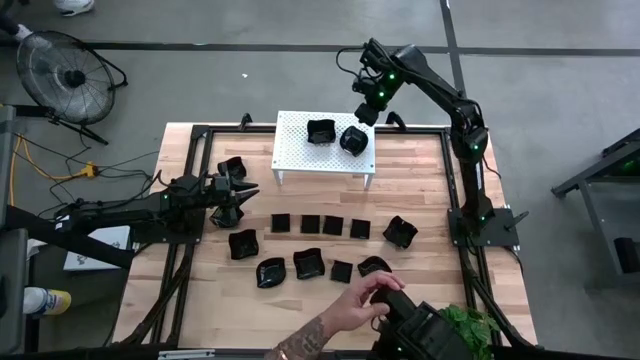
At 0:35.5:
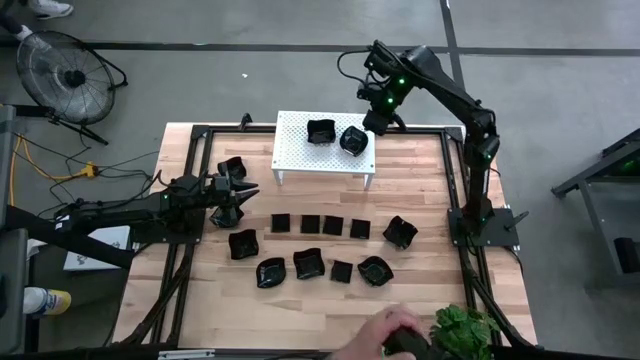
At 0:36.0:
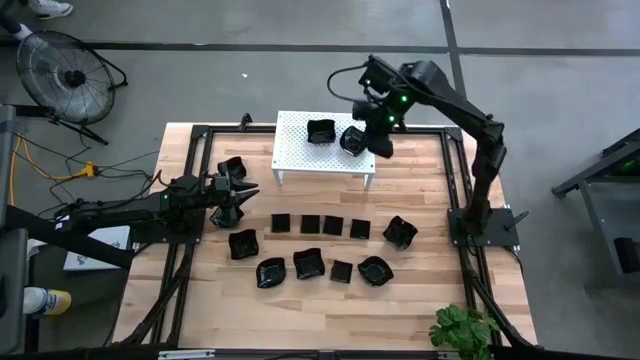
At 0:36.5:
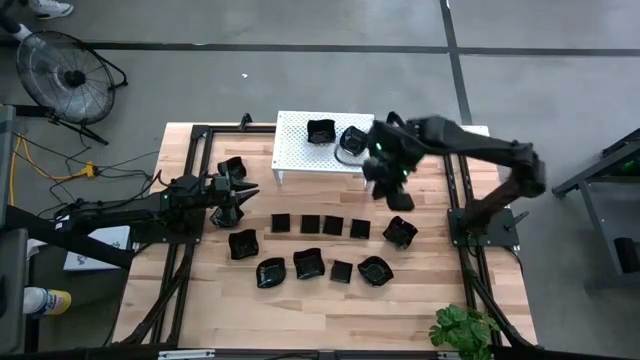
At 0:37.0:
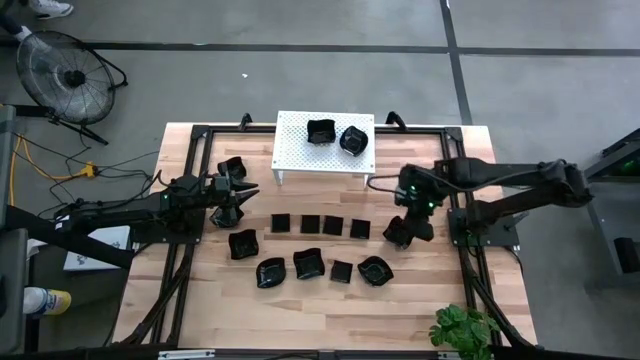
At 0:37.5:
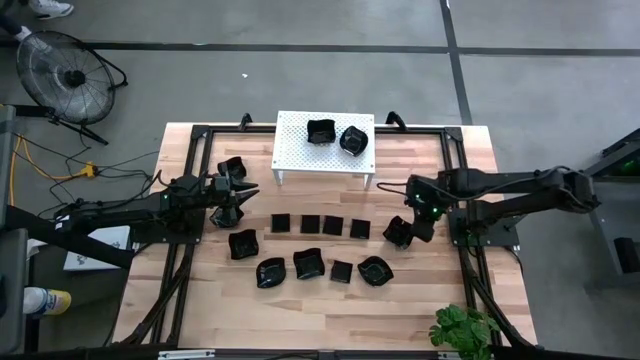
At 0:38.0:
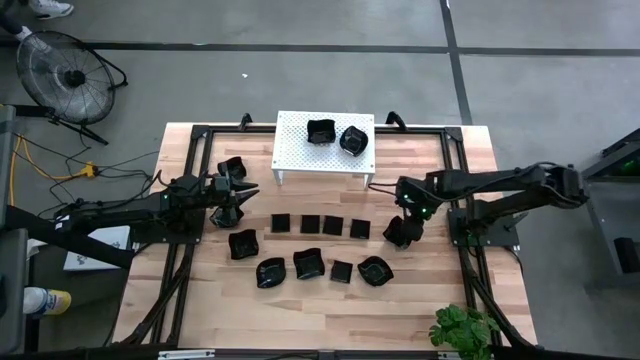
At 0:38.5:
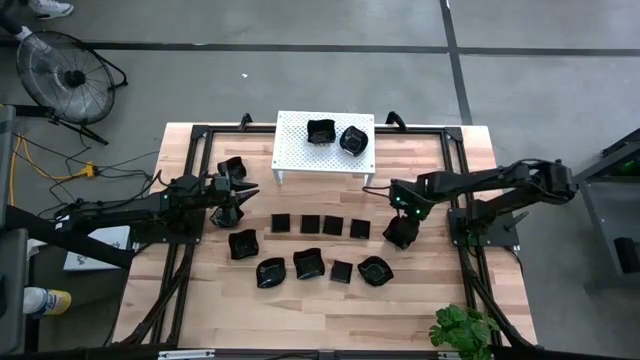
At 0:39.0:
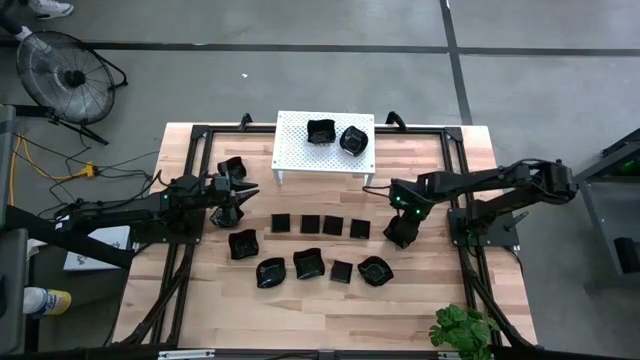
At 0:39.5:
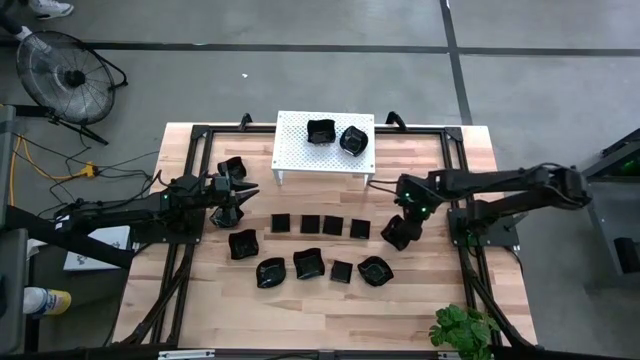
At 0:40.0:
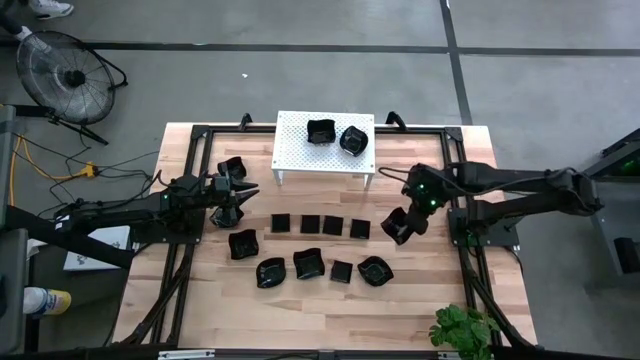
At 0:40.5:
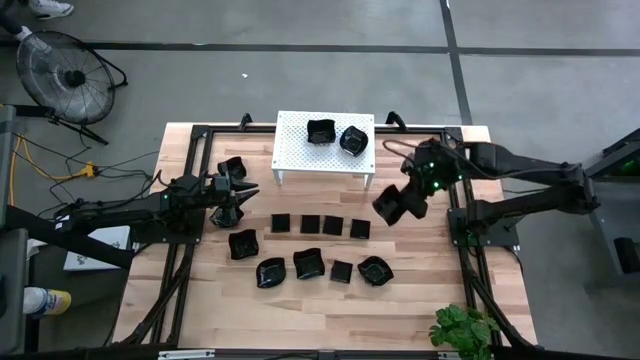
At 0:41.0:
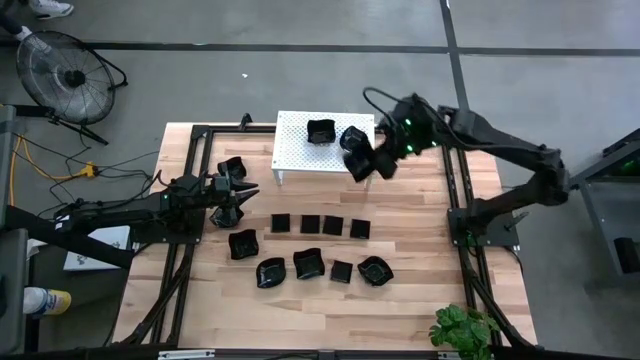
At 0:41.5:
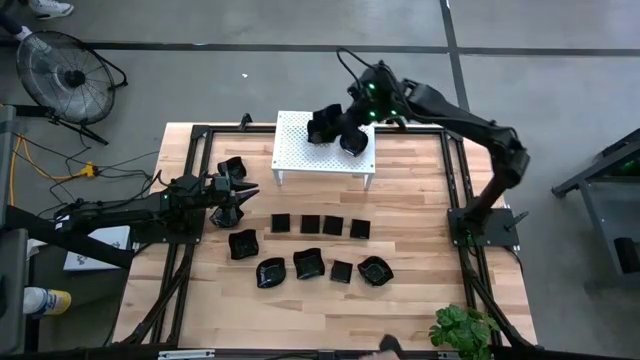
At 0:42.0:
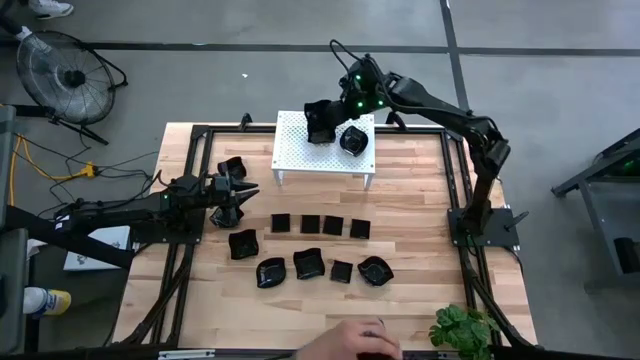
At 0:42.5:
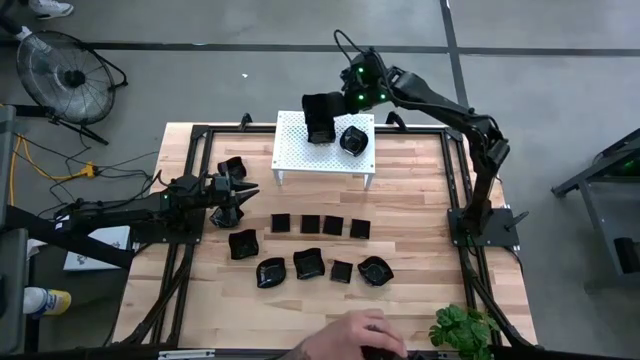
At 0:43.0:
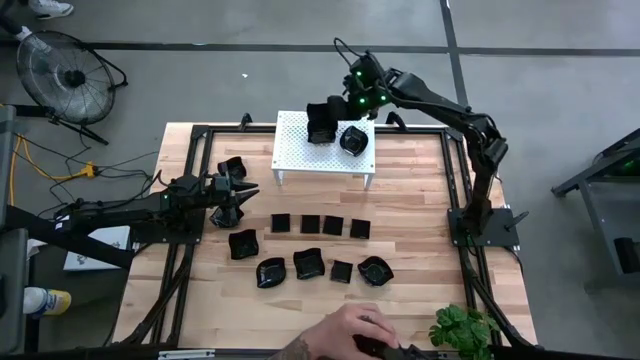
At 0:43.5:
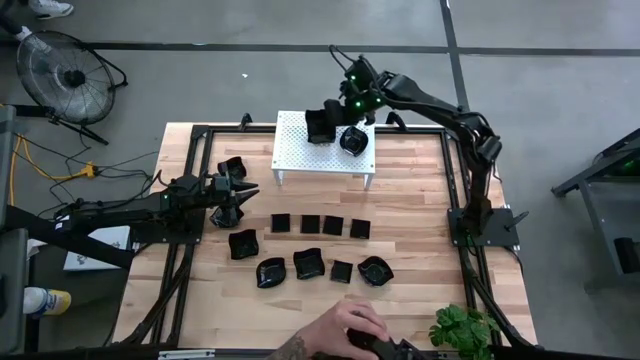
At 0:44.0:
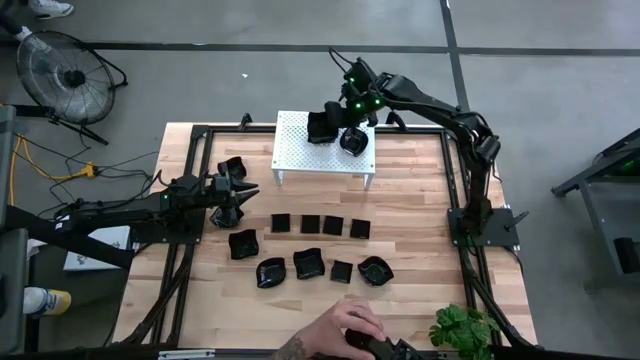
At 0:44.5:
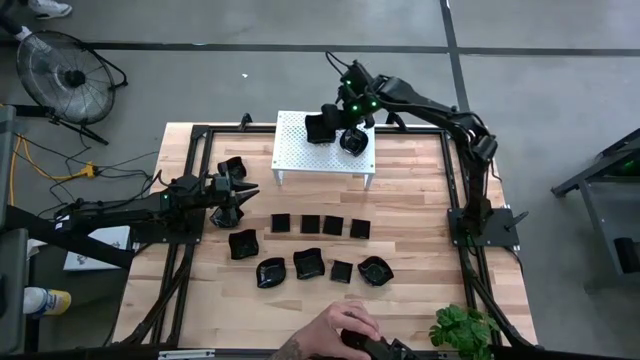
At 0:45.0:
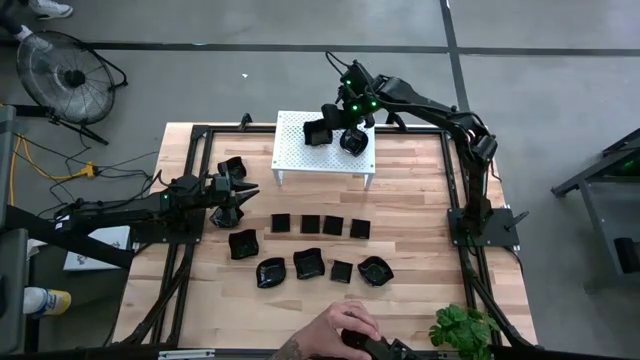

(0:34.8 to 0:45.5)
Task: Pick & Place Mini shaped plates
Stack the distorted square plate on top of the other distorted square plate on the shelf

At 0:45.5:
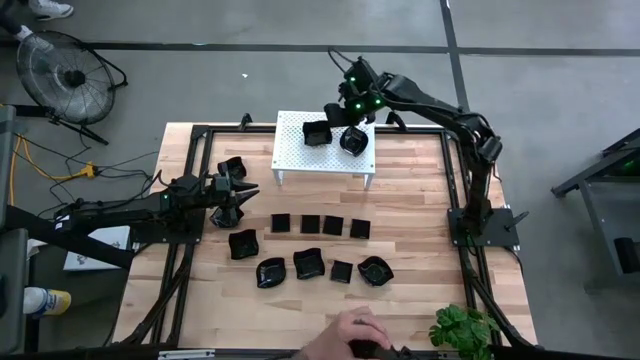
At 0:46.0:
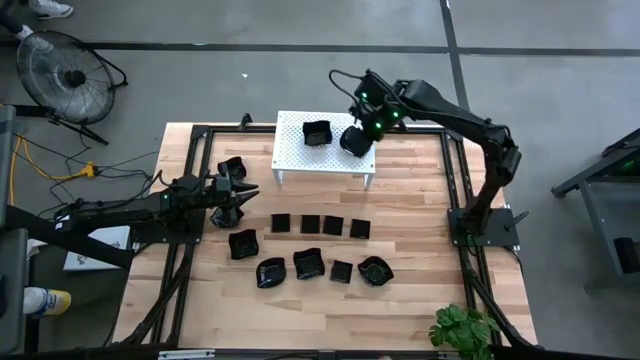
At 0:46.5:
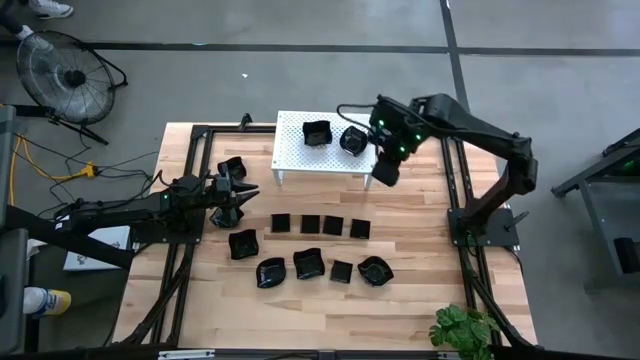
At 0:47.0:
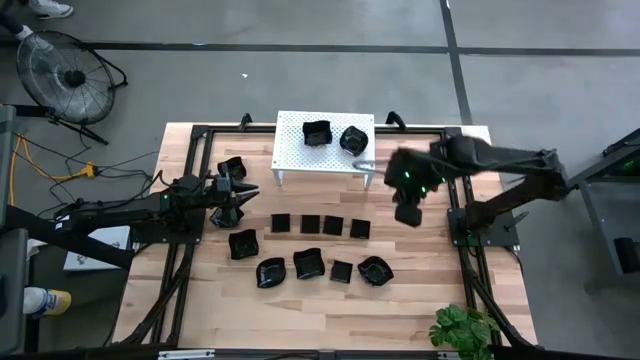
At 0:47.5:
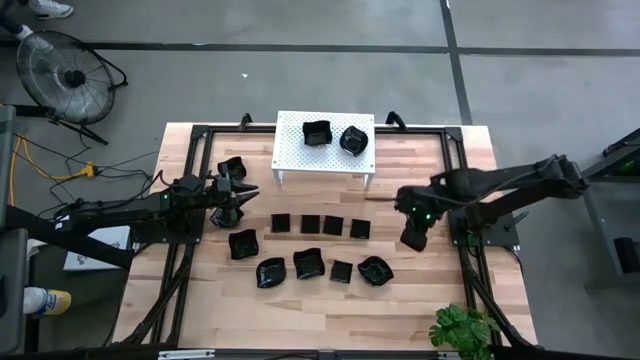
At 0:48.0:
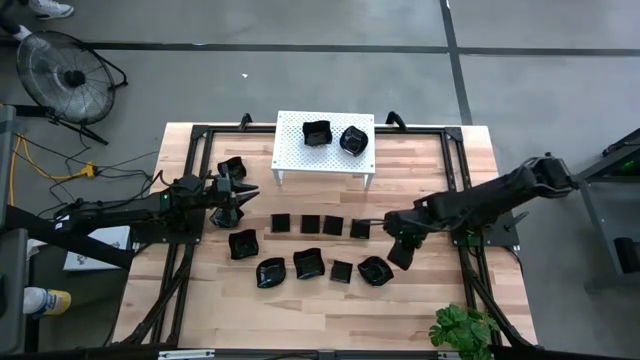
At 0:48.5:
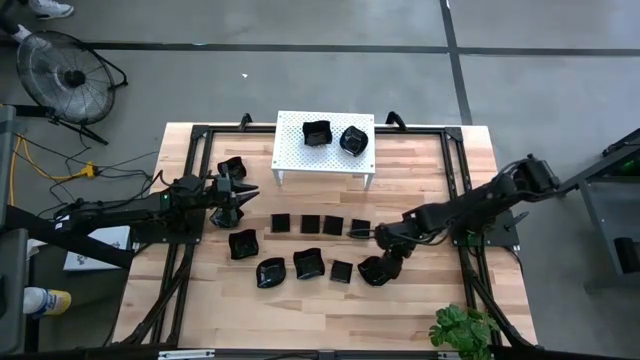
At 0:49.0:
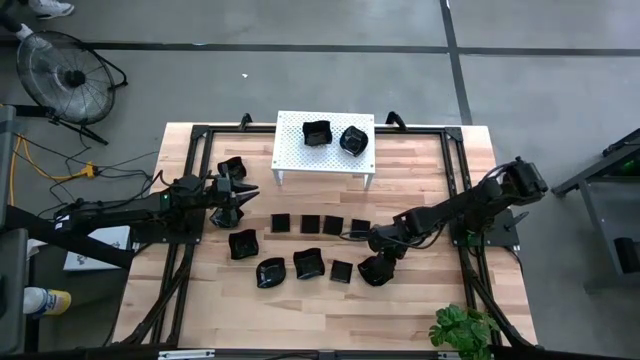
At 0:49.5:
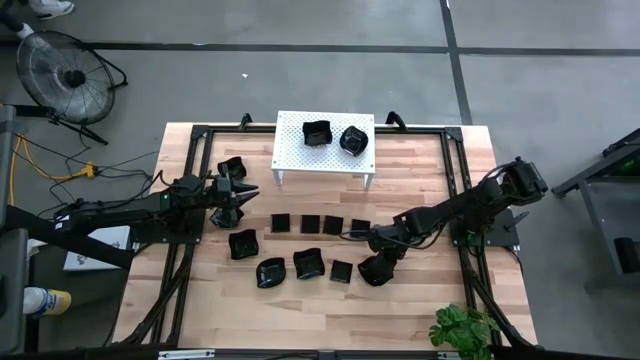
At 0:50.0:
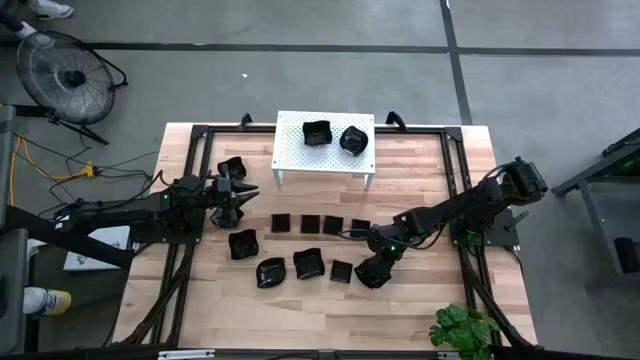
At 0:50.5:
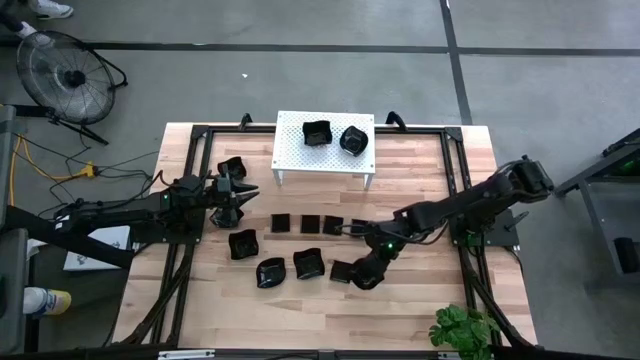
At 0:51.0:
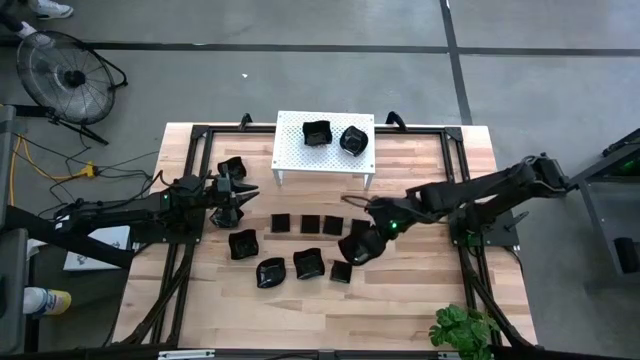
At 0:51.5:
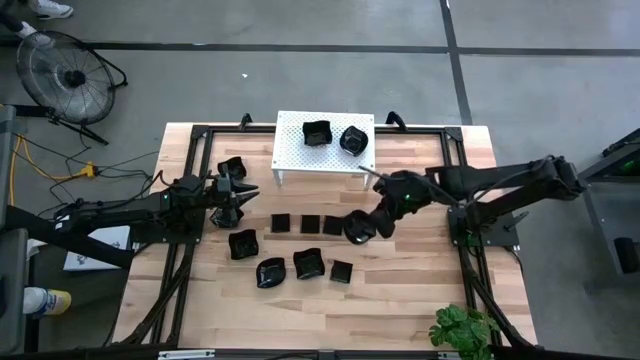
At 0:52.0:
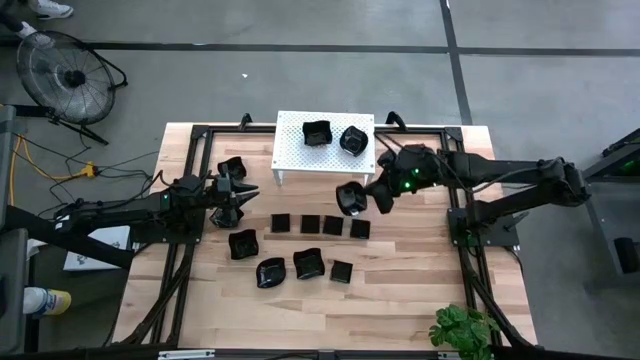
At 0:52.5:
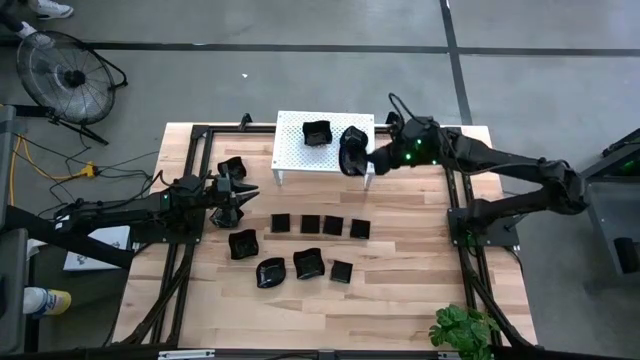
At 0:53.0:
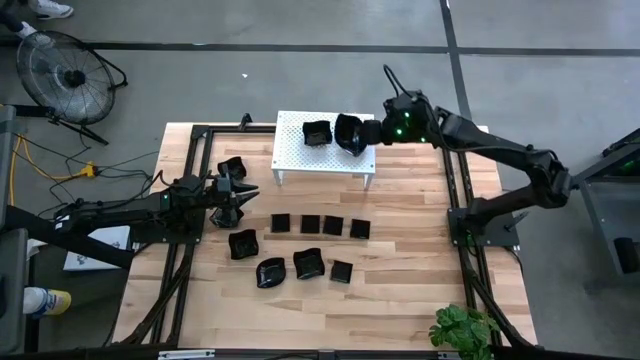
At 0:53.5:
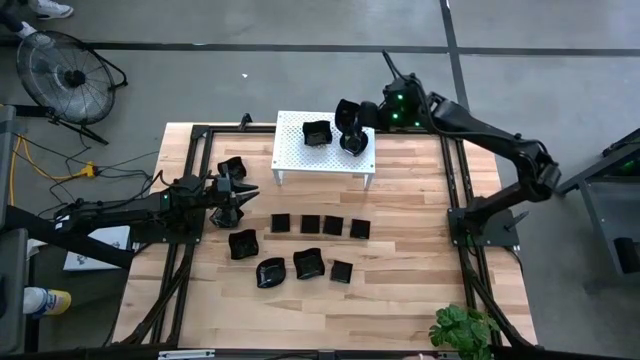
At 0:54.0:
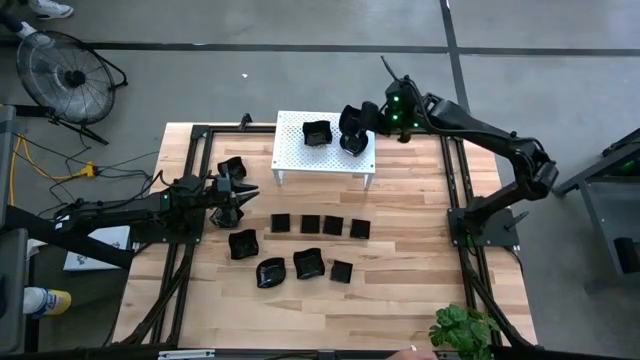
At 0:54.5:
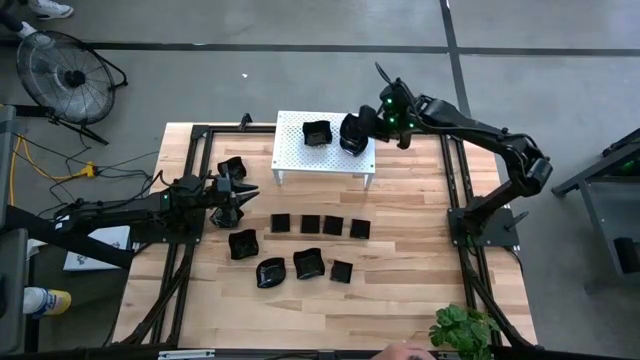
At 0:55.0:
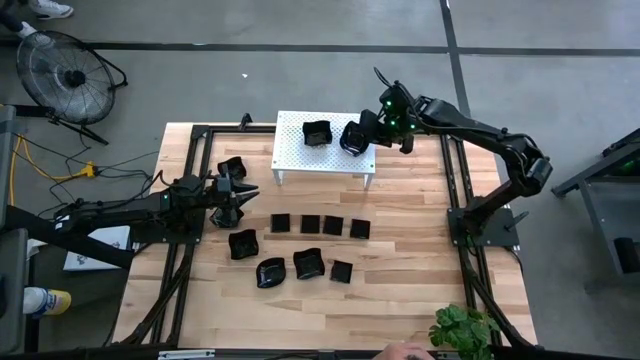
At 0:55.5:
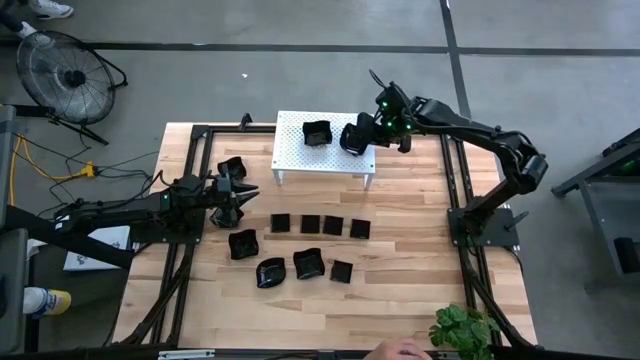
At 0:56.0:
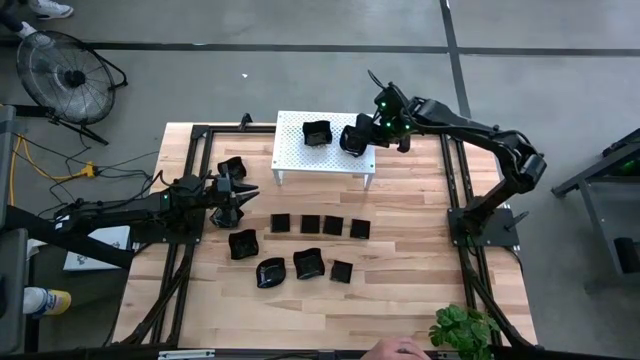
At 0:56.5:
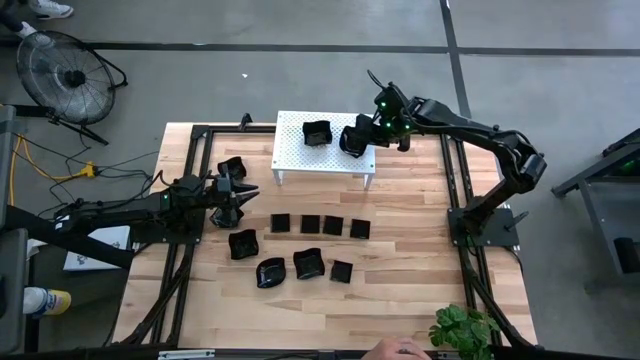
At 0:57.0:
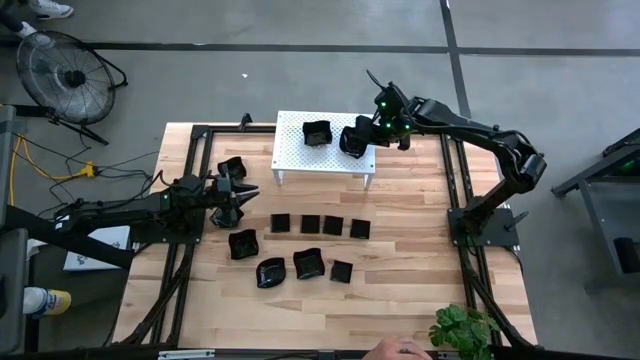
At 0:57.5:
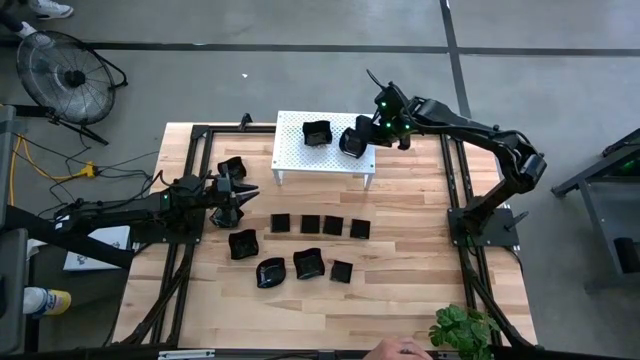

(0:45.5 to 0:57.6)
Stack the leaf shaped plate on top of the other leaf shaped plates on the shelf
